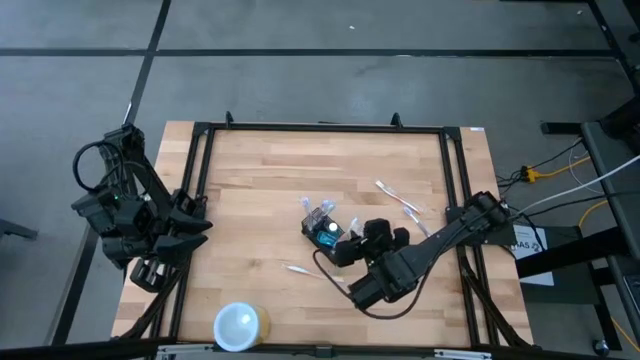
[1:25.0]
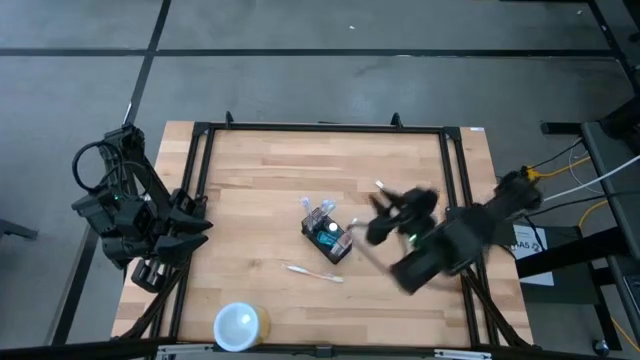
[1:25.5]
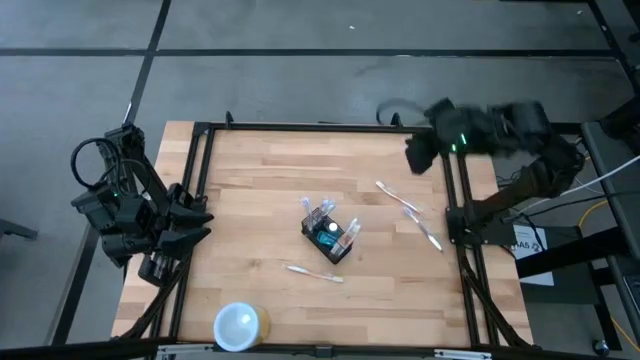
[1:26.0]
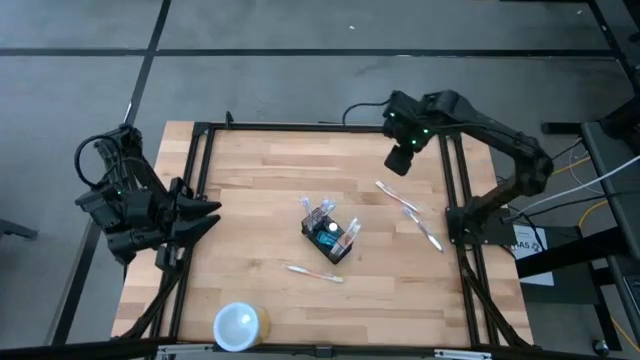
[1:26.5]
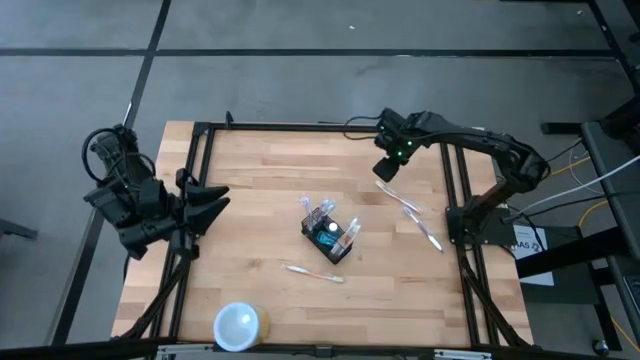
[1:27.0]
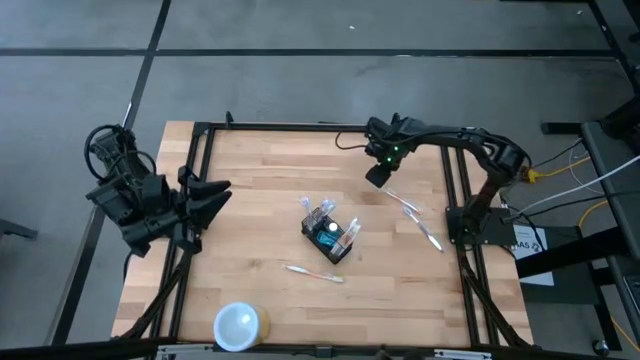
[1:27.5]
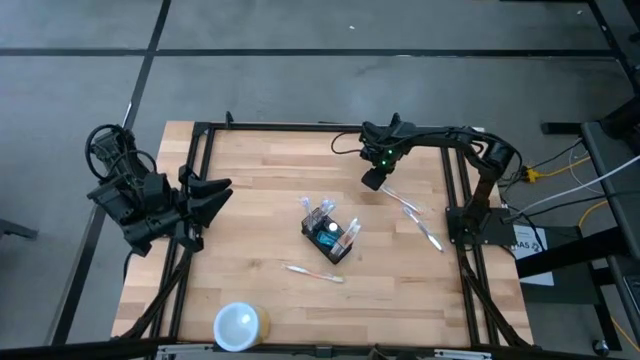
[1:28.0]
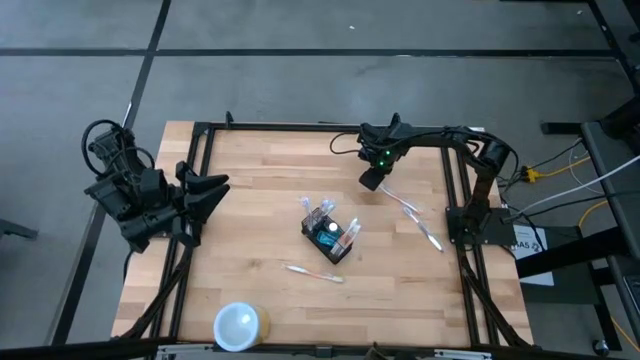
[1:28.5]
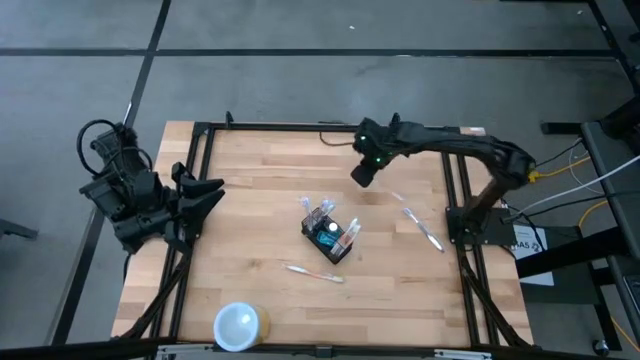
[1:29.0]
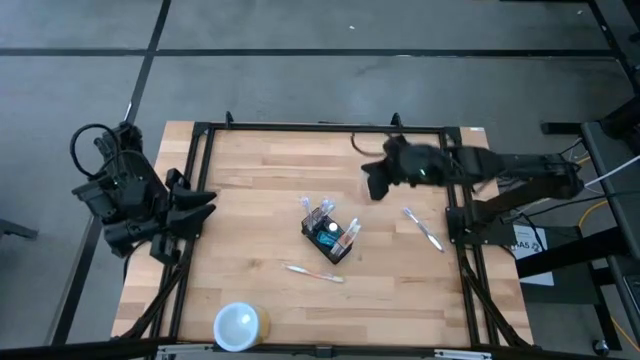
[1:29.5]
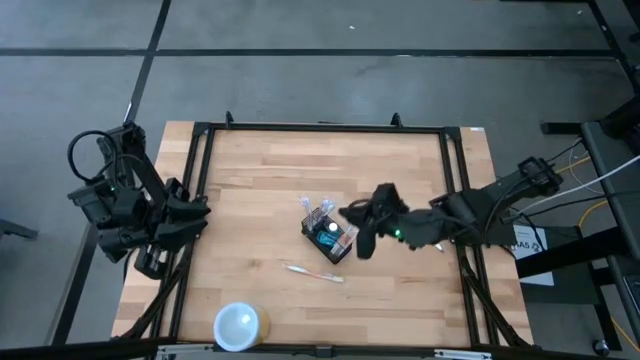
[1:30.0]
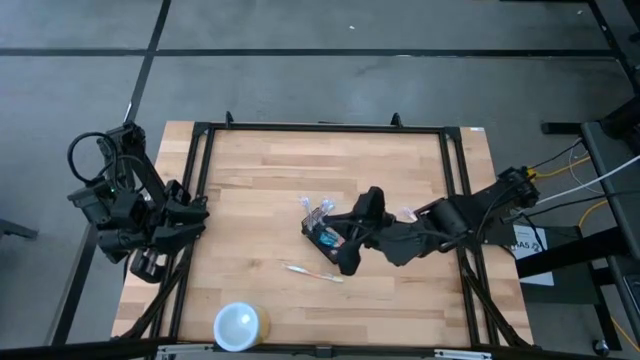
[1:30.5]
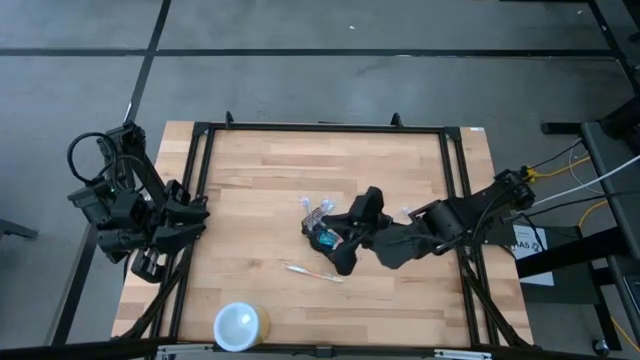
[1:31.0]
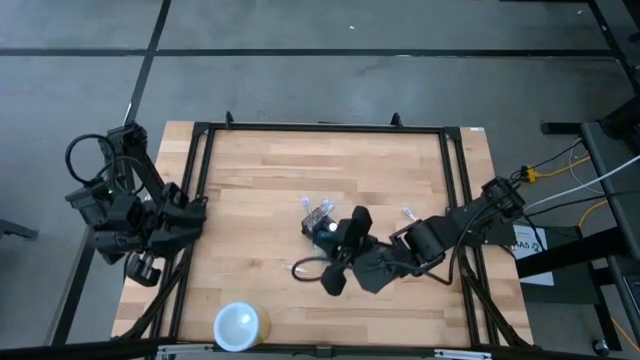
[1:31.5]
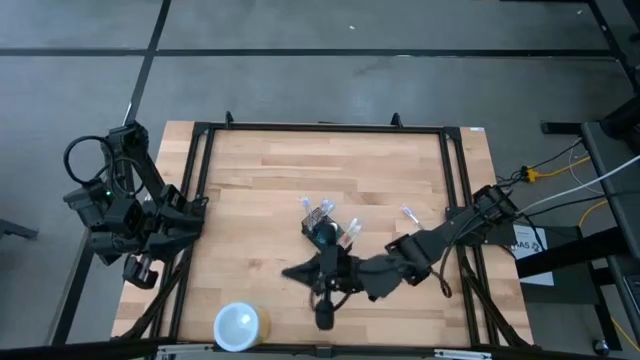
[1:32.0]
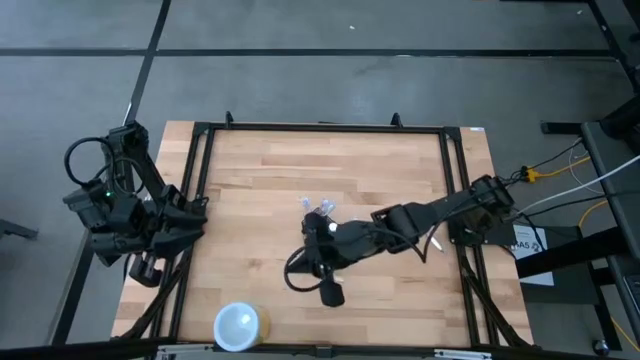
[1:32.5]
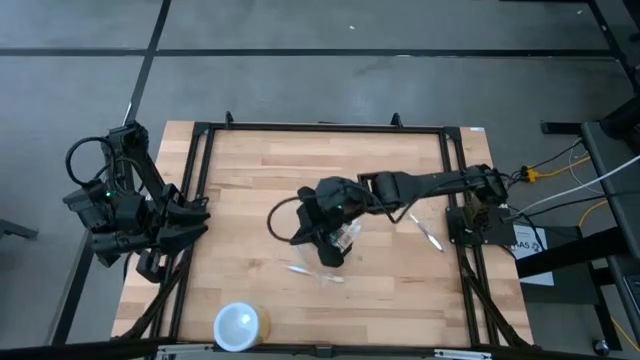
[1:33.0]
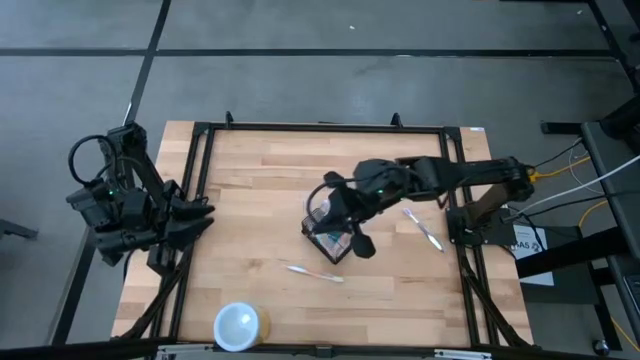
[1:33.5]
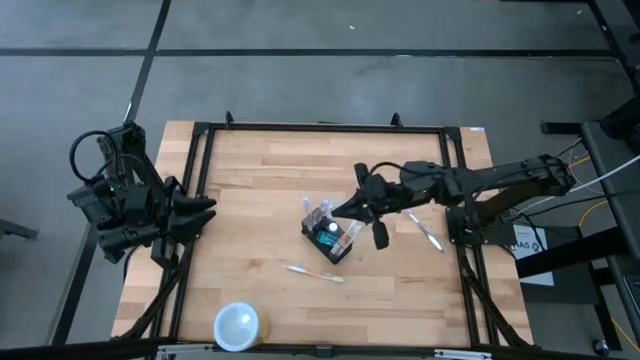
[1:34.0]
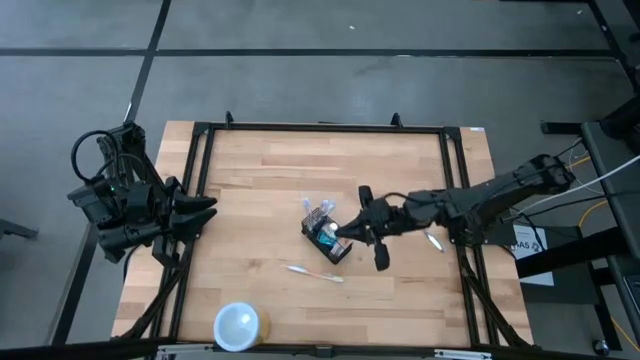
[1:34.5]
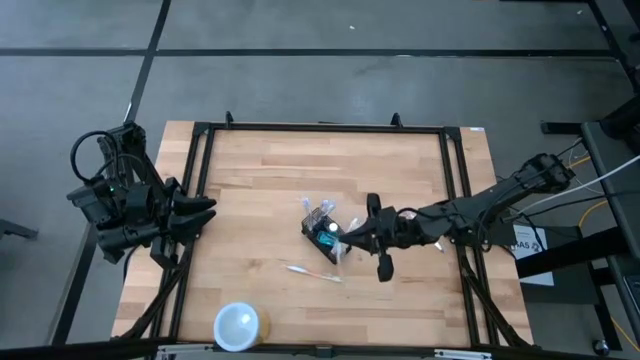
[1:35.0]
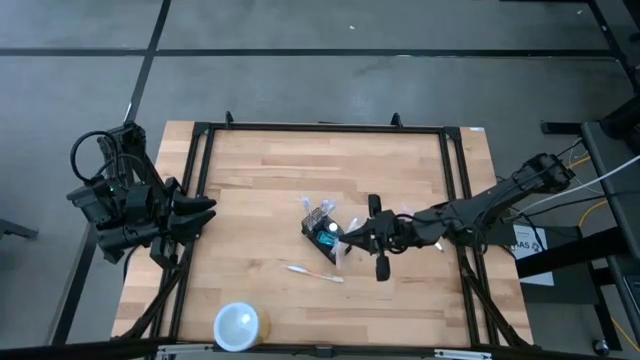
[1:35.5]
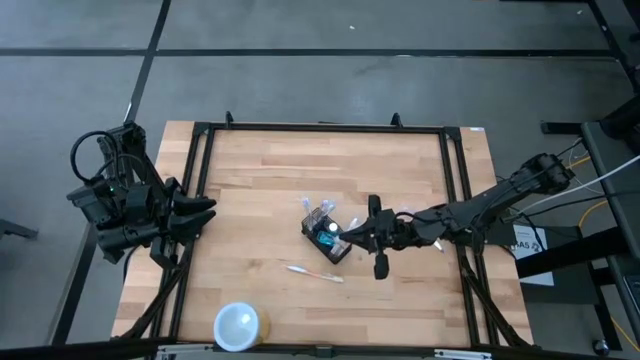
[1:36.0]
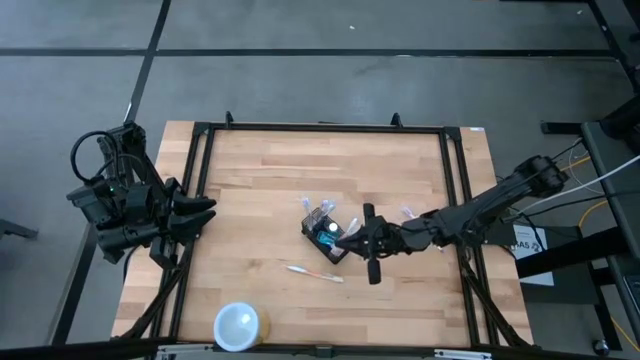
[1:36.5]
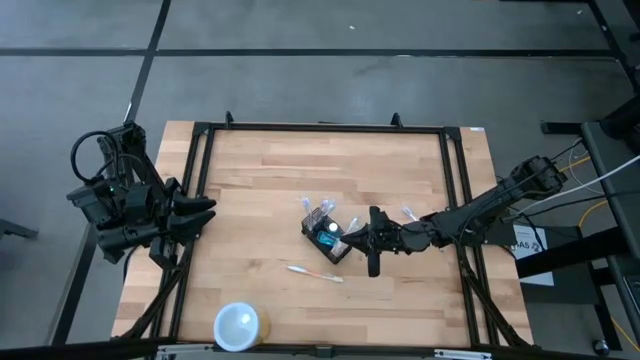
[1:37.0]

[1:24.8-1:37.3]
Task: Pick & Place toothbrushing station
Put the orange toothbrush into the wire organizer

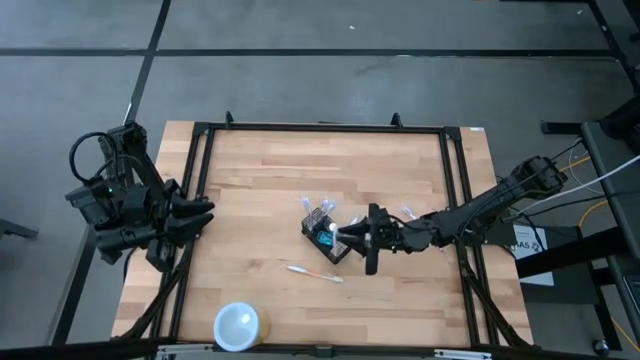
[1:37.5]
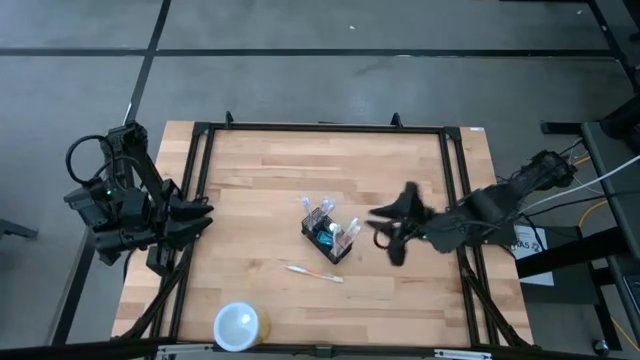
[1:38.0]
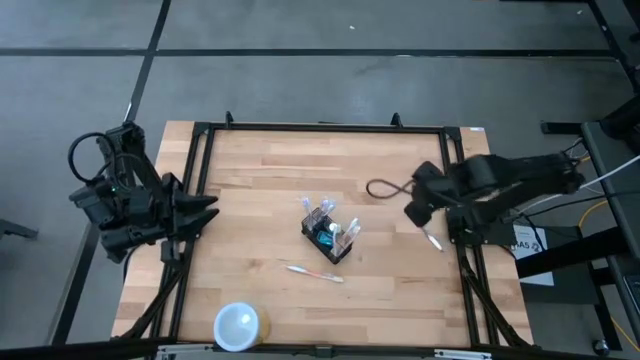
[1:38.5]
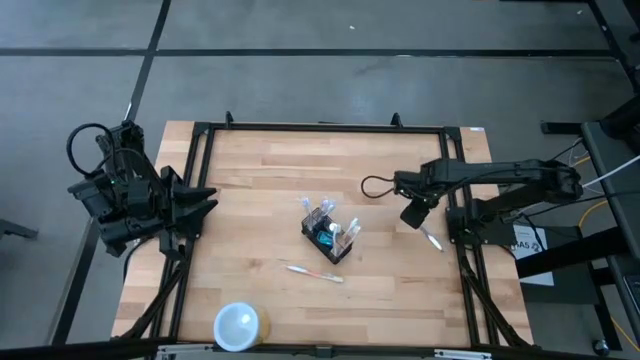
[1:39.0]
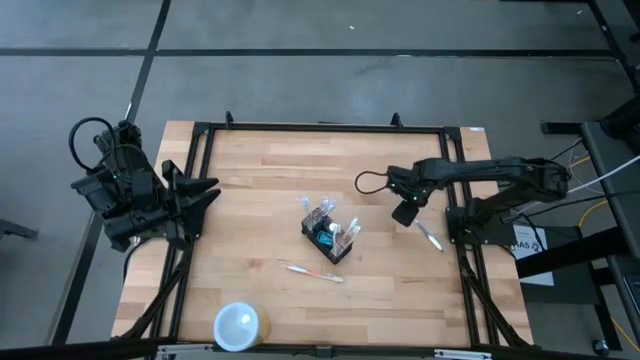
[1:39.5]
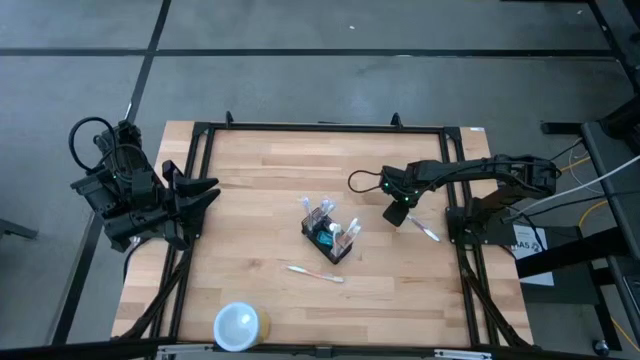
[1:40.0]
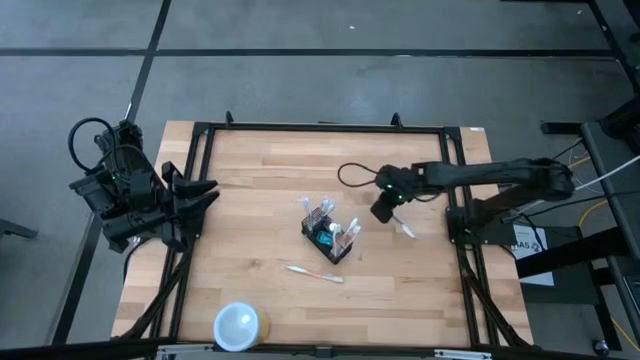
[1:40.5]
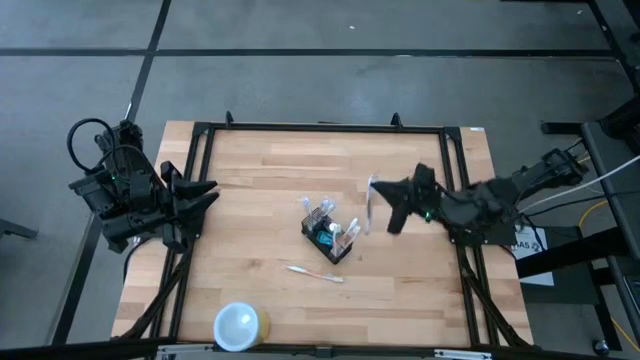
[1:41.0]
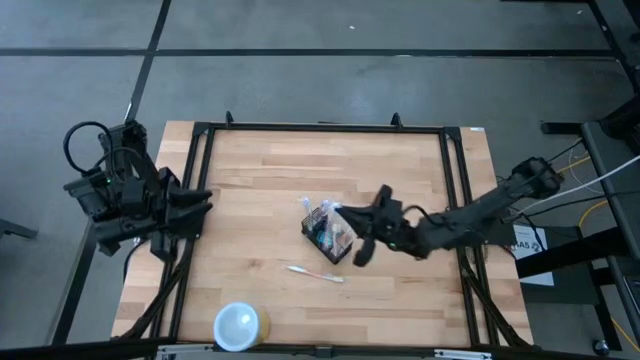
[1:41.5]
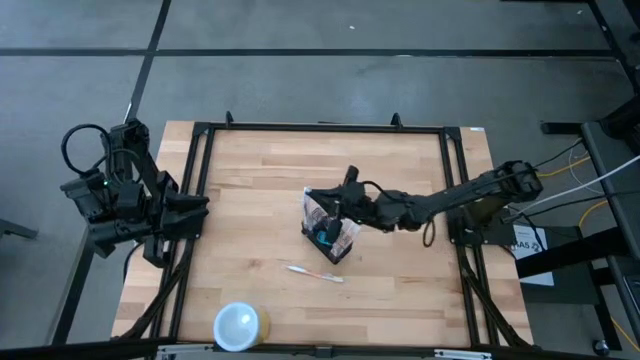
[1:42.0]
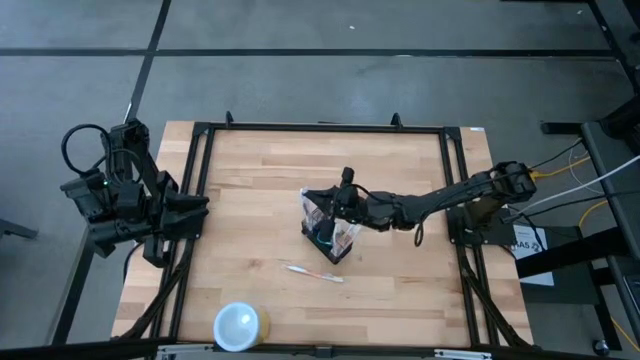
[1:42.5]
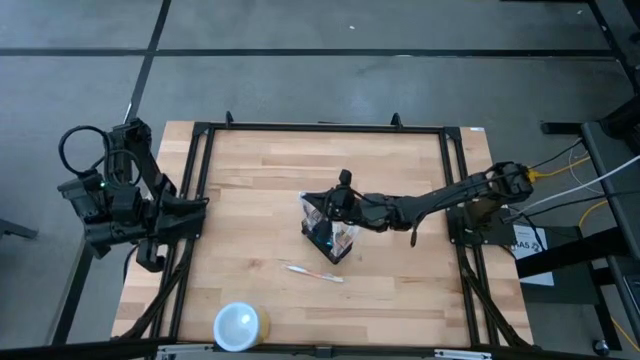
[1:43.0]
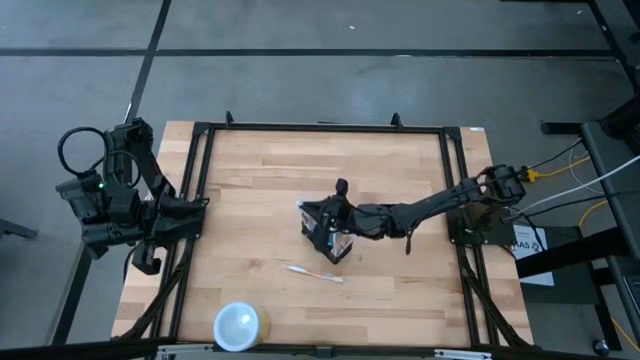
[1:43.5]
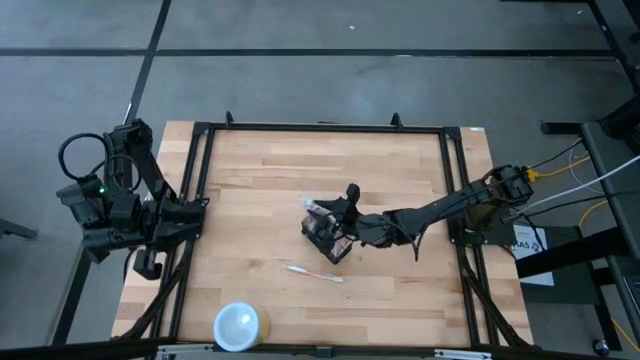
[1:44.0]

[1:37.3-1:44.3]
Put the violet toothbrush into the wire organizer

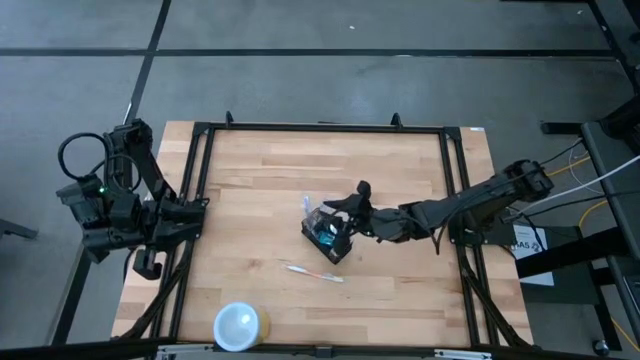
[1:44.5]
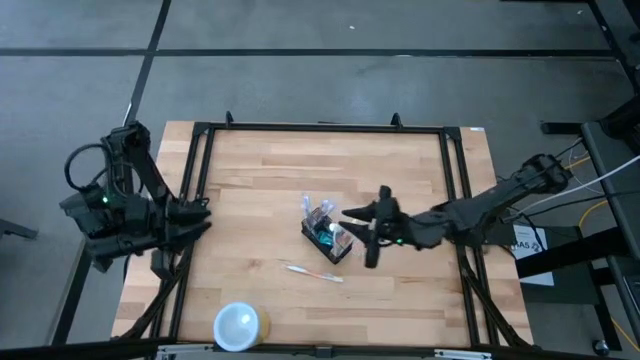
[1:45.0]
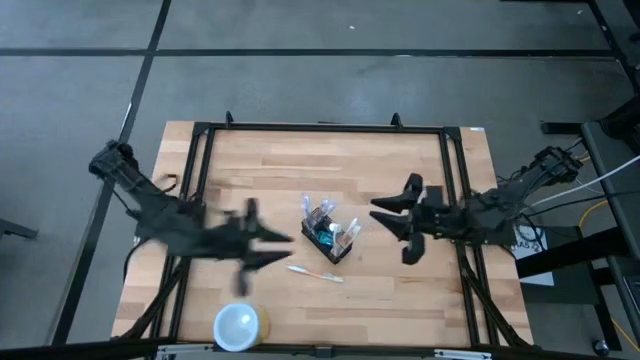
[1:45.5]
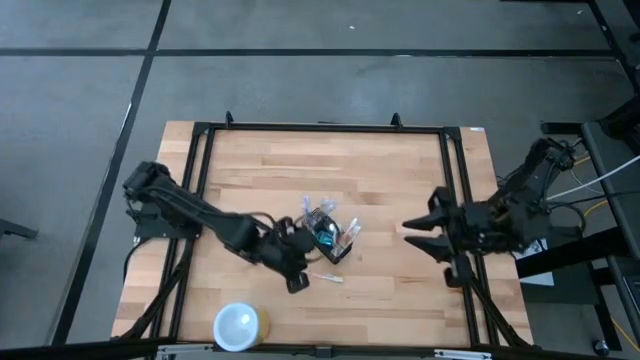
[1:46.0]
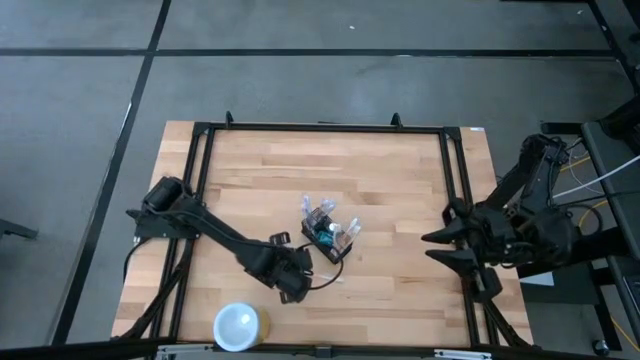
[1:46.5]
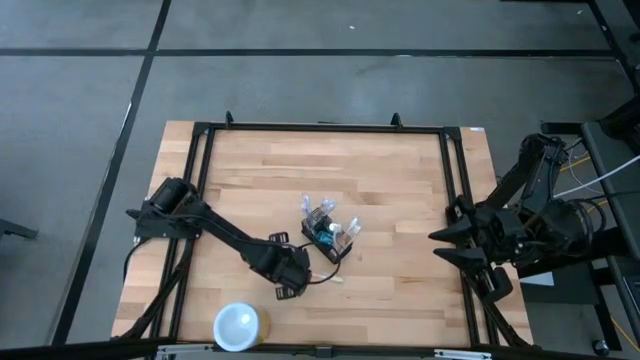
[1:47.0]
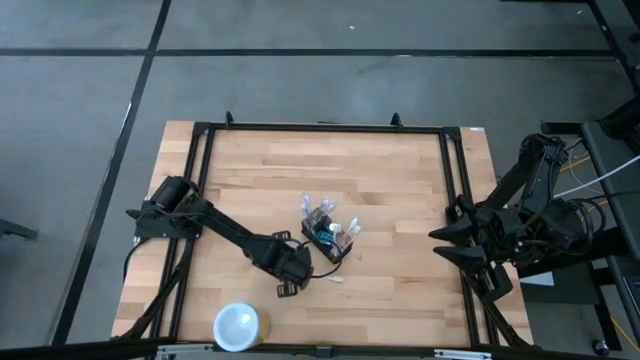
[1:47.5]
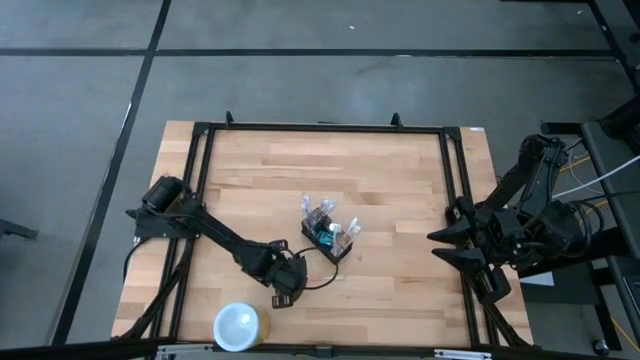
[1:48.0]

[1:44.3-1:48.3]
Put the orange toothbrush into the wire organizer
